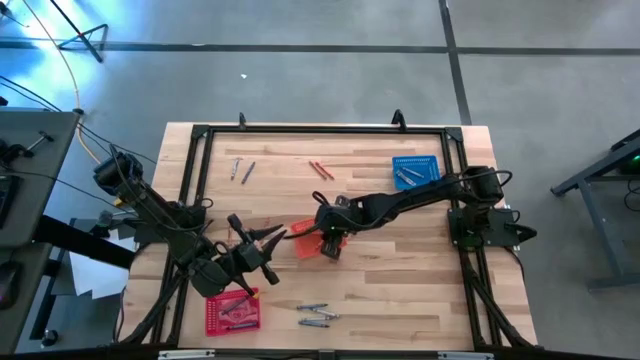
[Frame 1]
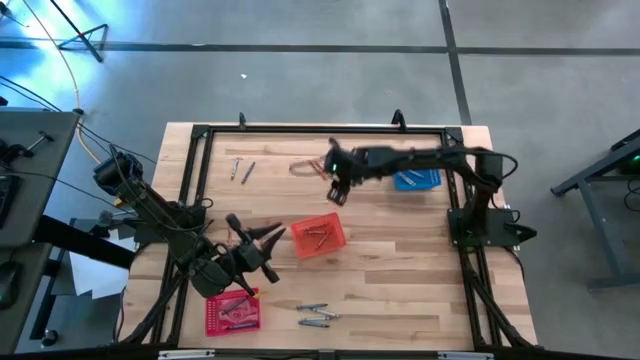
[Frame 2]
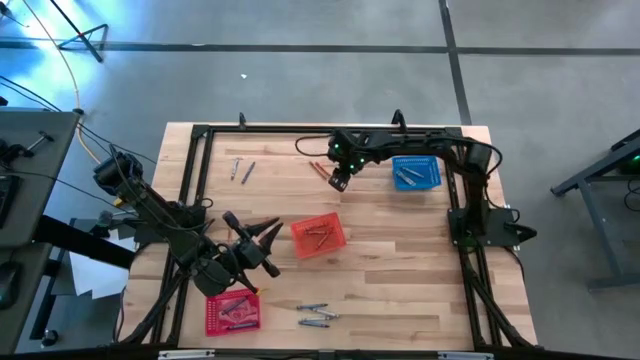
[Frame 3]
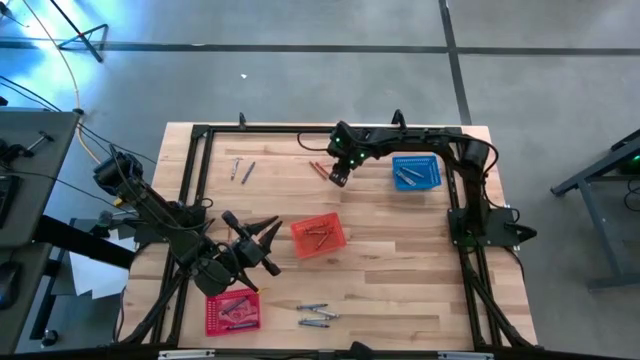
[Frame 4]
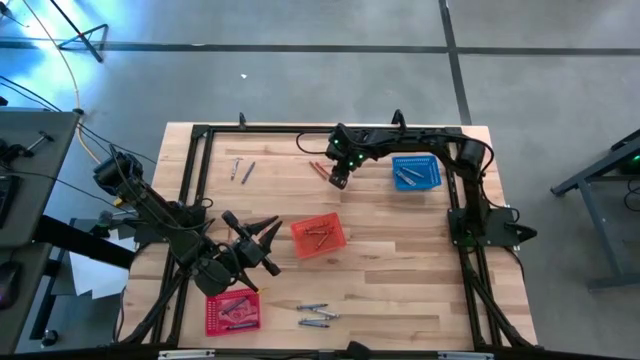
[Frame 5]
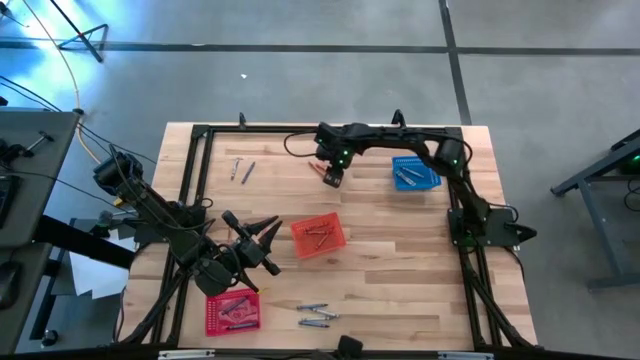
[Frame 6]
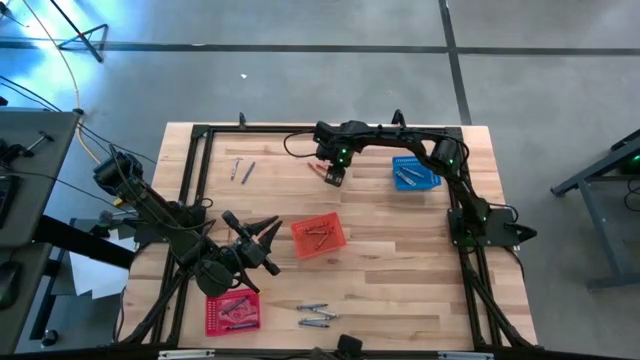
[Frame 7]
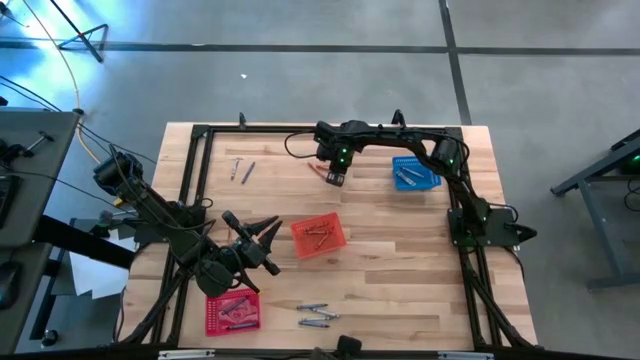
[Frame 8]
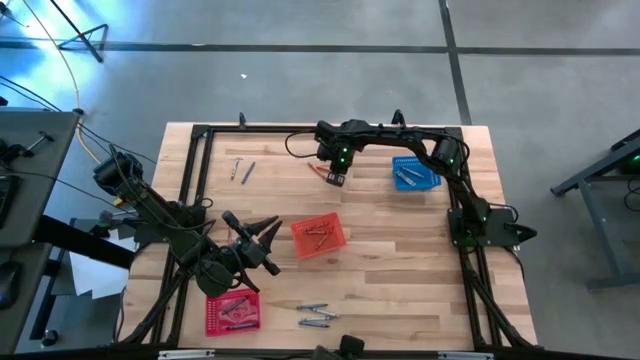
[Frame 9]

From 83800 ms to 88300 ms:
Task: Sort crayons
Put the orange crayon into the orange bin

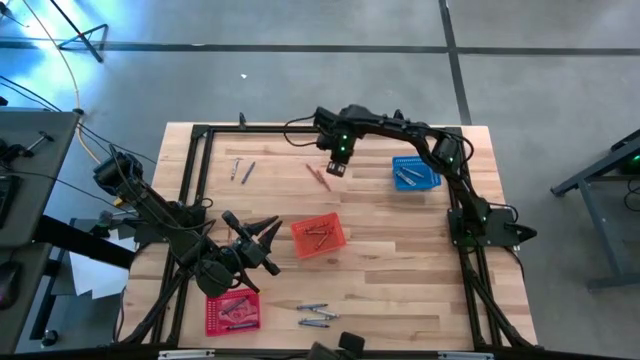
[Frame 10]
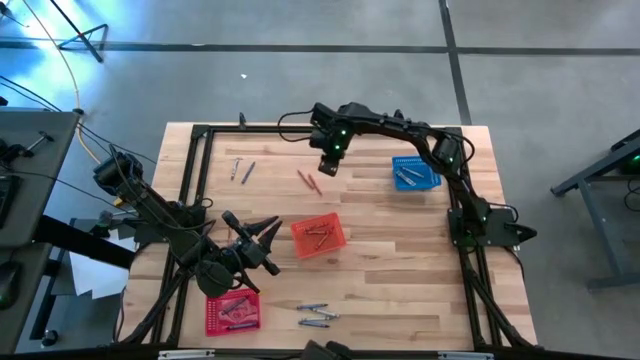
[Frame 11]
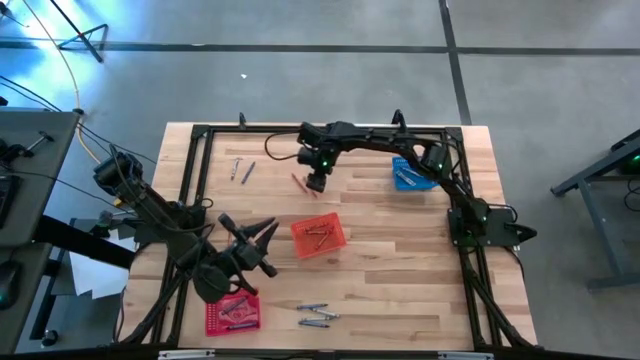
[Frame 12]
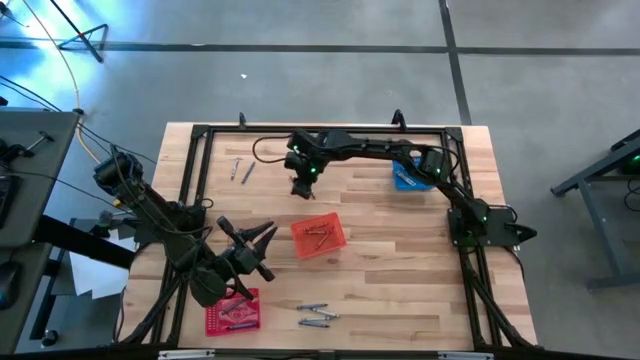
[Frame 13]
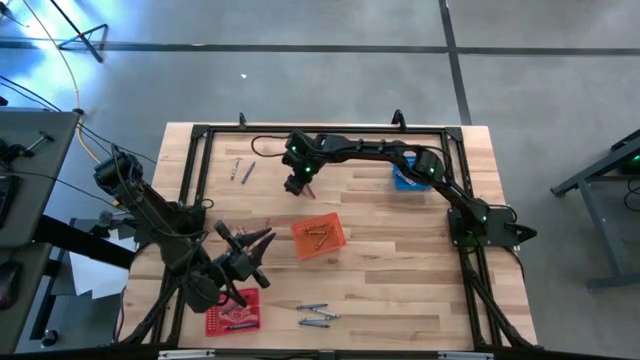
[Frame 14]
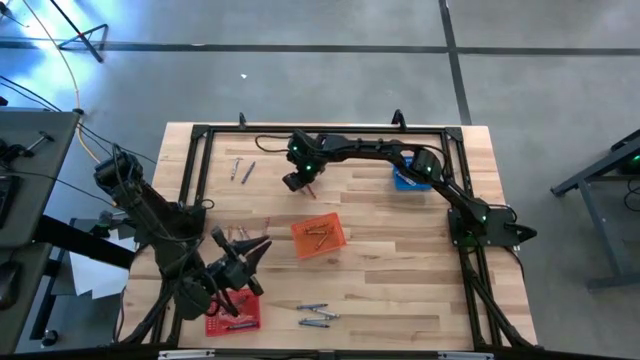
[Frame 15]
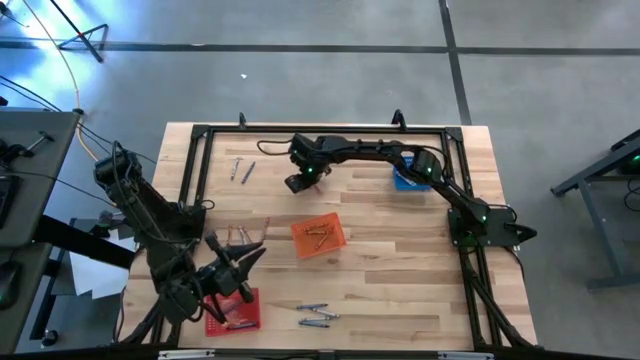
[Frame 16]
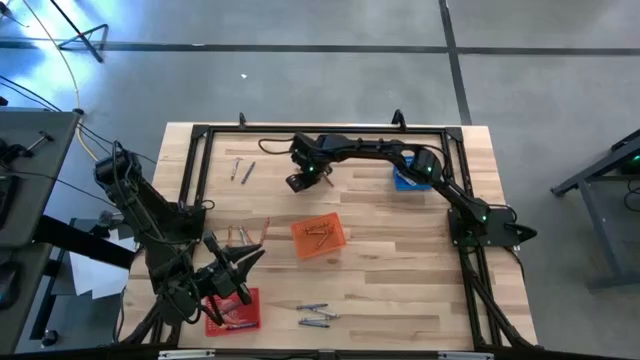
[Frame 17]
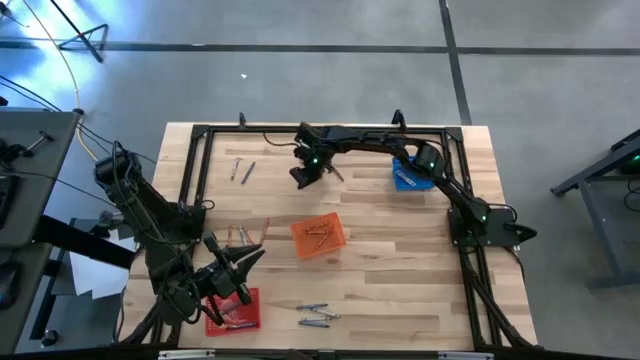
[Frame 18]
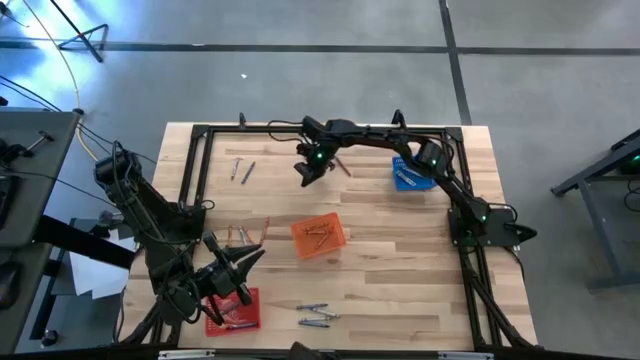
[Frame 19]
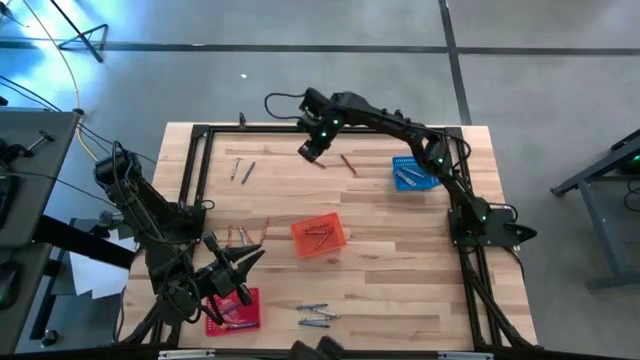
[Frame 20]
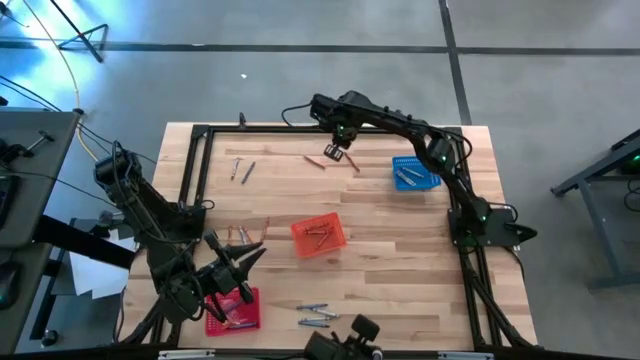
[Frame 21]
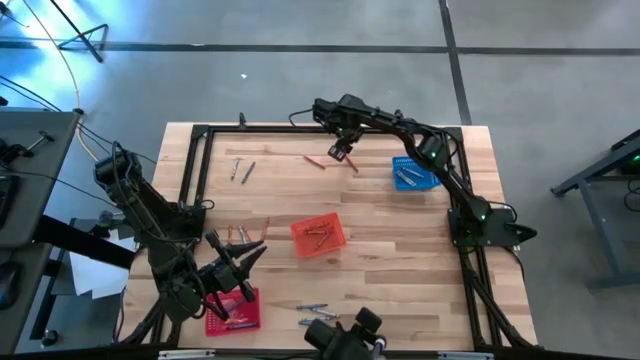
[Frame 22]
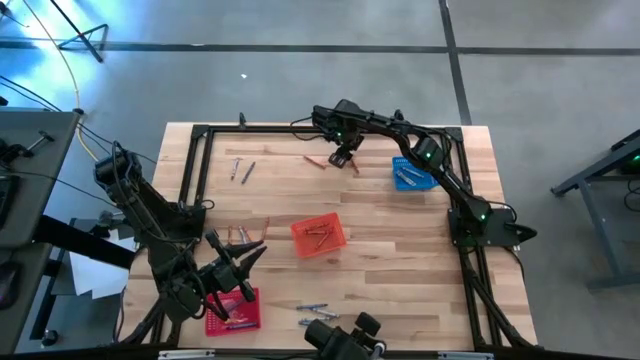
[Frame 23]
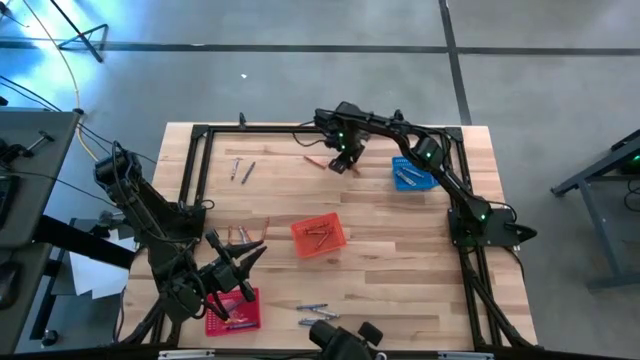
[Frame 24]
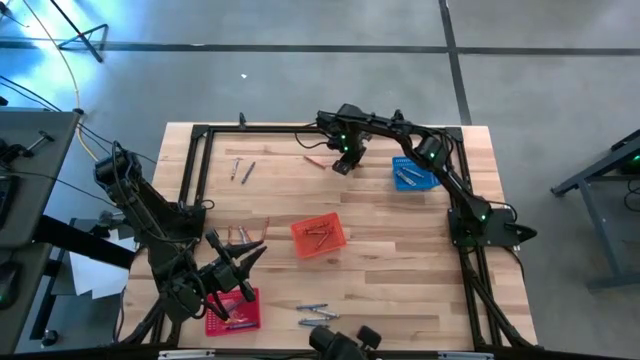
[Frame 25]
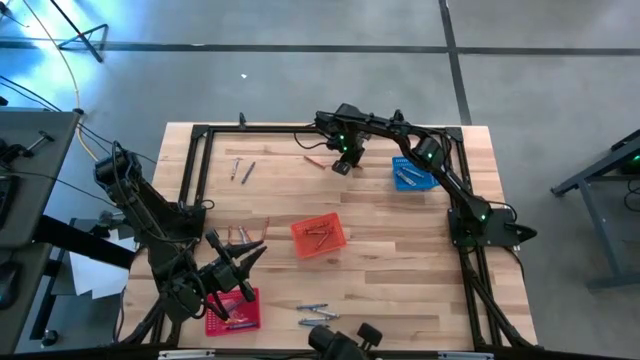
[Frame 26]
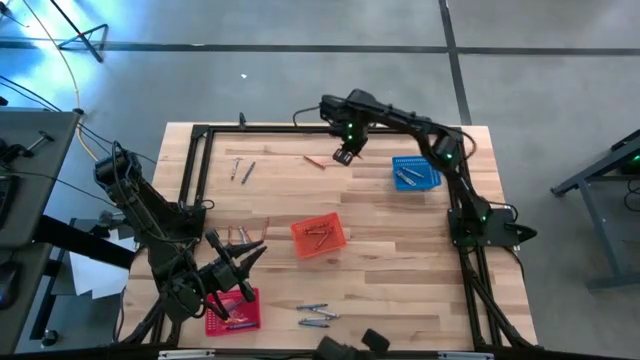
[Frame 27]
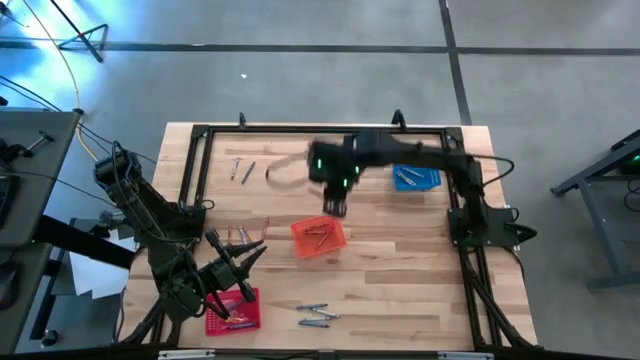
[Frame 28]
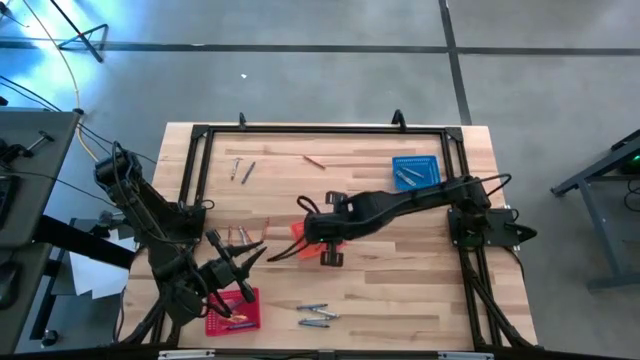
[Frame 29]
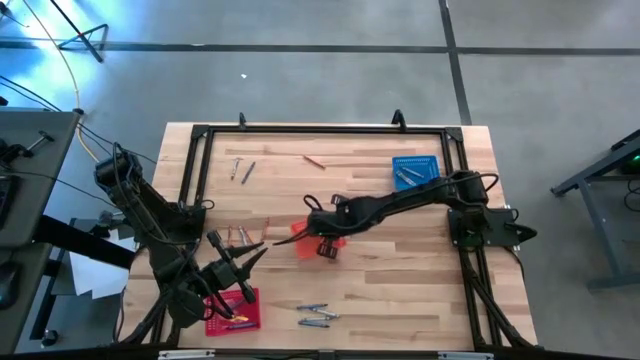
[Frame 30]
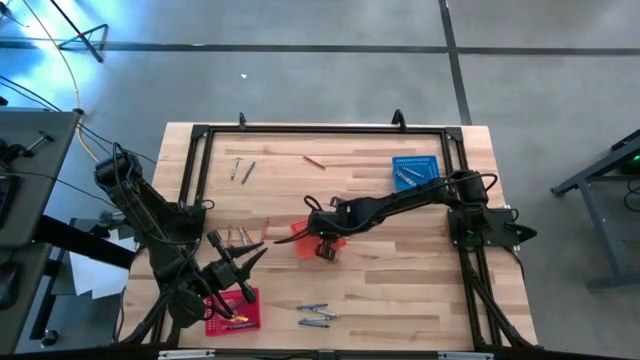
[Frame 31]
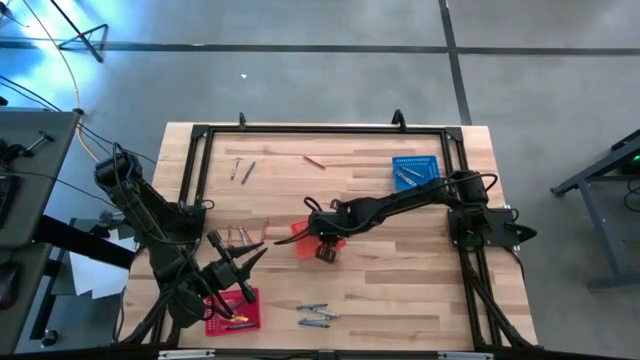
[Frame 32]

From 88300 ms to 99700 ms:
Put the orange crayon into the orange bin

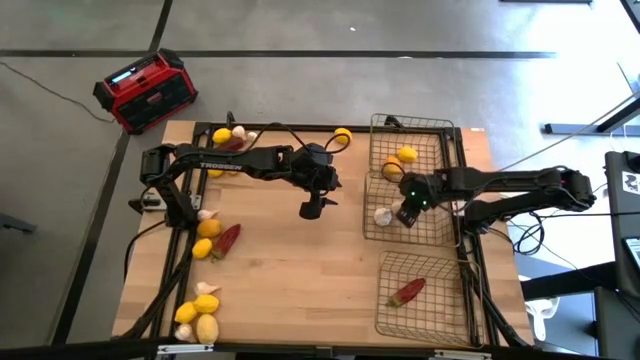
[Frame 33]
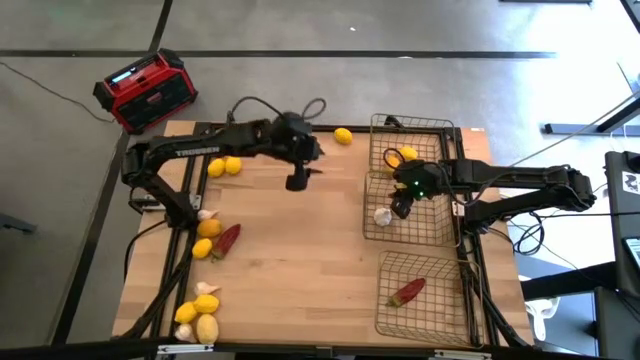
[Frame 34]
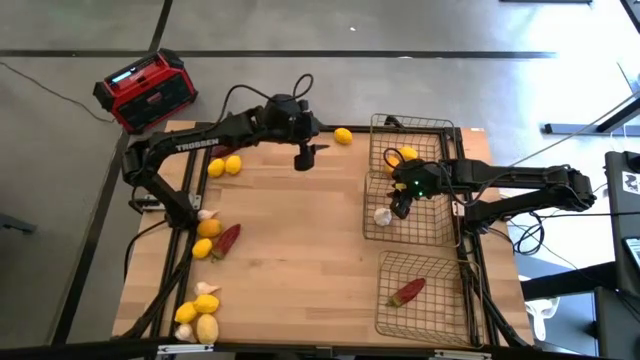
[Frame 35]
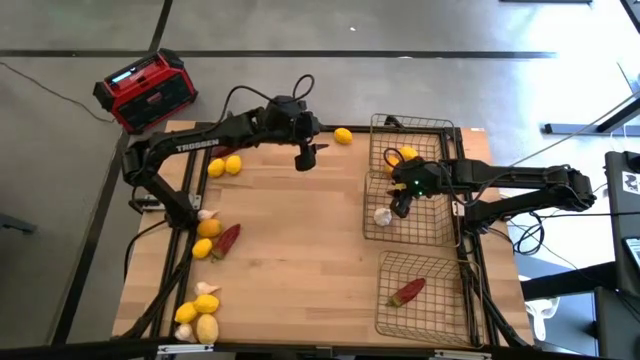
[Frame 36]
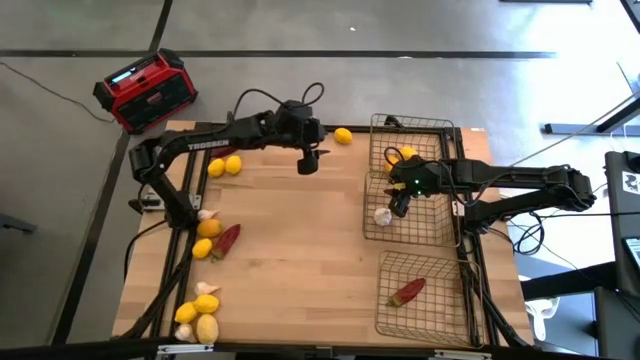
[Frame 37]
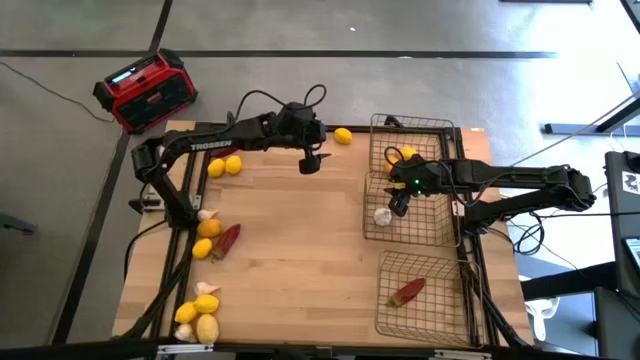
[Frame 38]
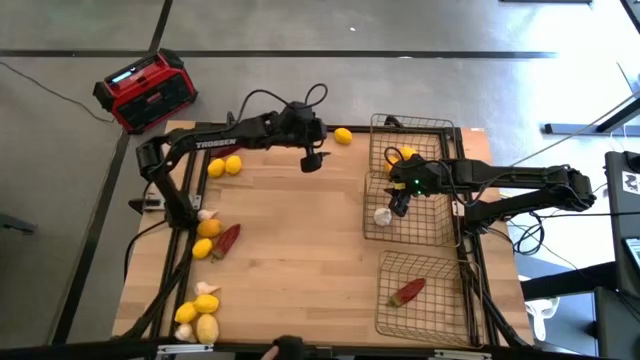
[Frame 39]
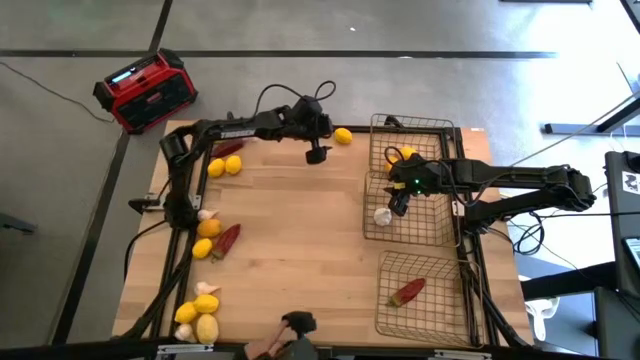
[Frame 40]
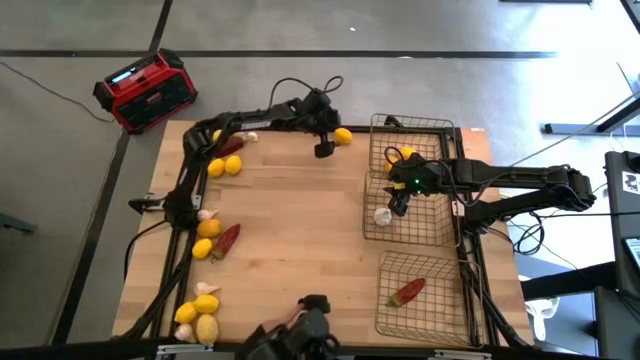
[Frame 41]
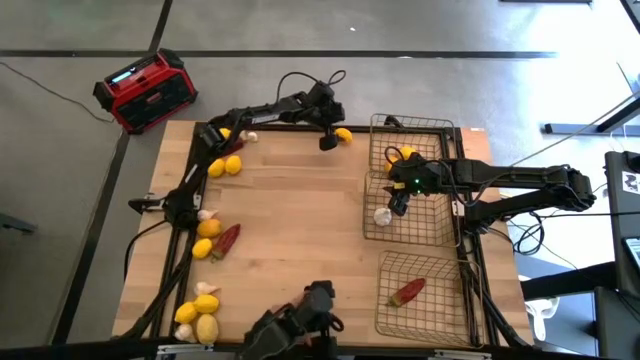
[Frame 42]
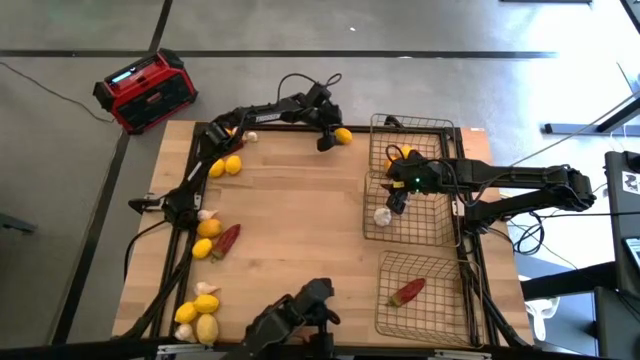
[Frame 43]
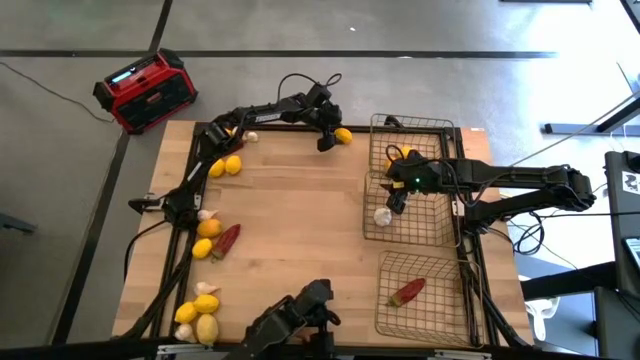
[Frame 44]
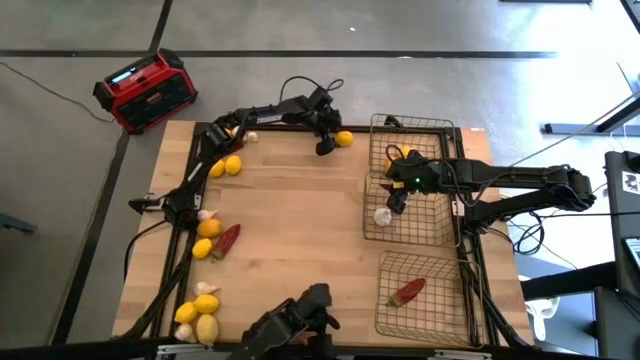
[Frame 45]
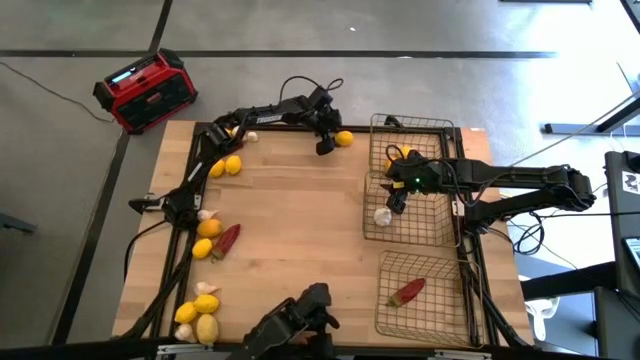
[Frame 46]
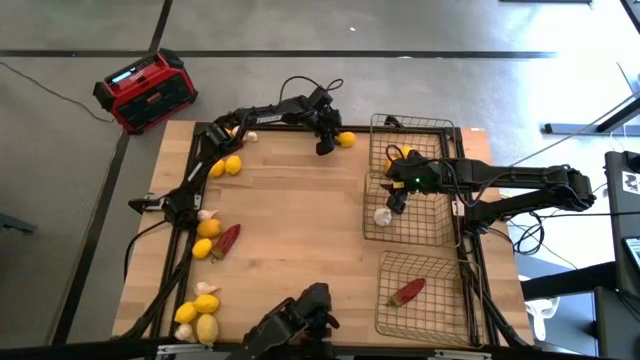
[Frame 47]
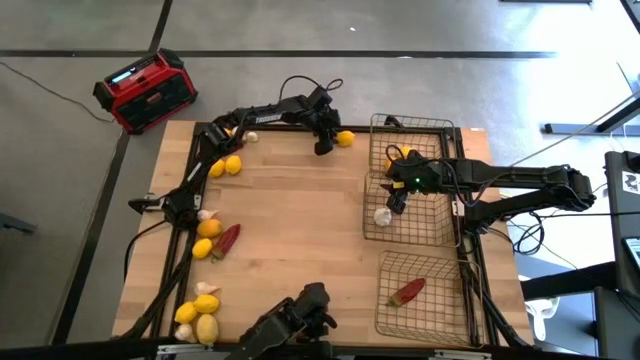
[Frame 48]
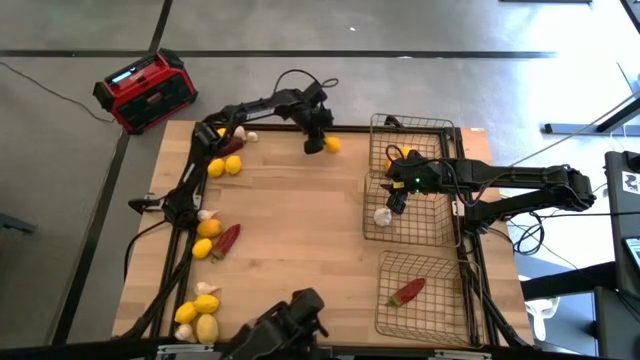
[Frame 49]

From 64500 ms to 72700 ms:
Task: Sort produce into baskets
Put the yellow lemon into the top wire basket
